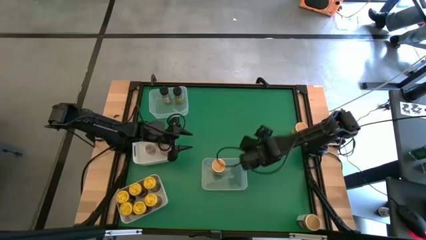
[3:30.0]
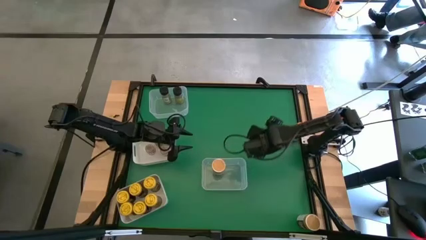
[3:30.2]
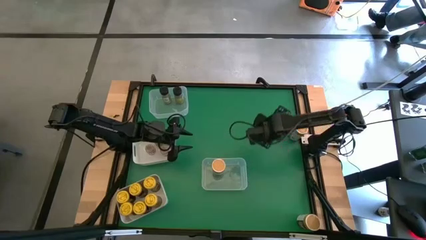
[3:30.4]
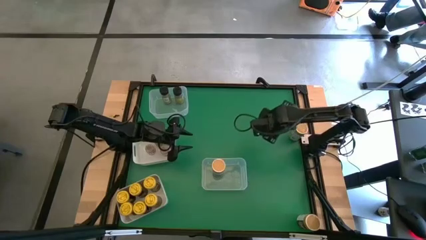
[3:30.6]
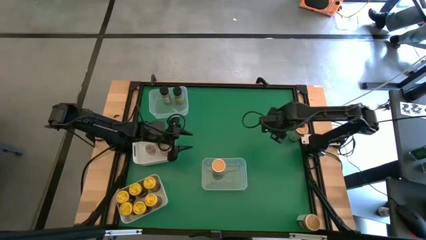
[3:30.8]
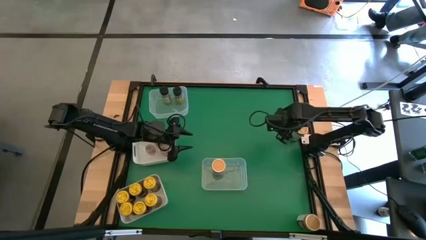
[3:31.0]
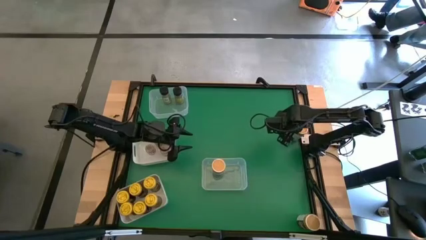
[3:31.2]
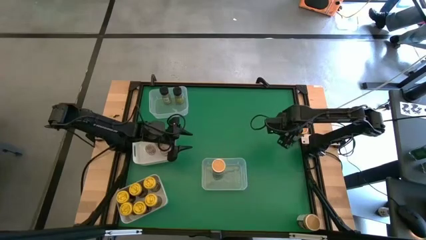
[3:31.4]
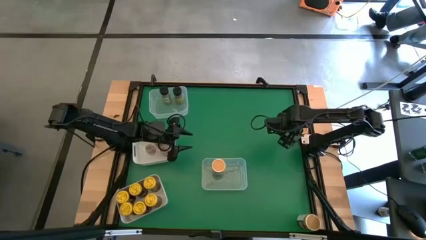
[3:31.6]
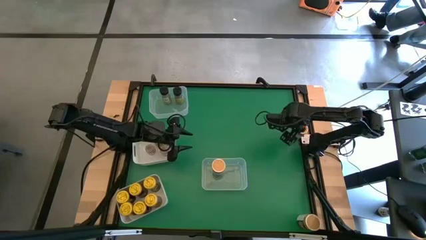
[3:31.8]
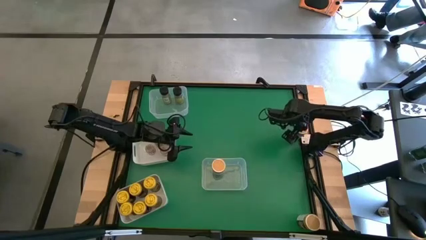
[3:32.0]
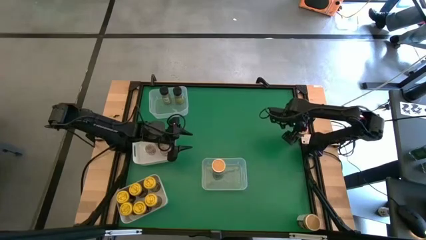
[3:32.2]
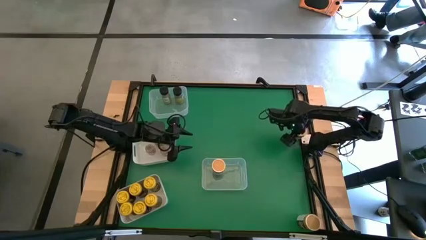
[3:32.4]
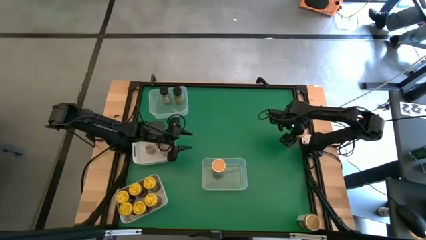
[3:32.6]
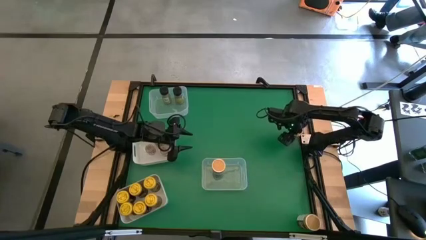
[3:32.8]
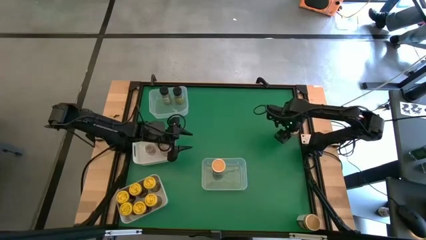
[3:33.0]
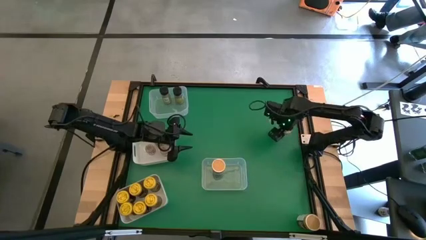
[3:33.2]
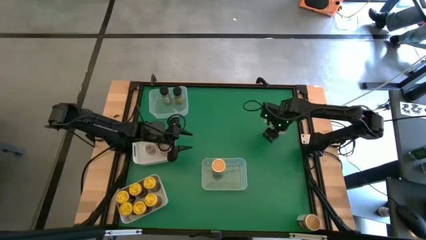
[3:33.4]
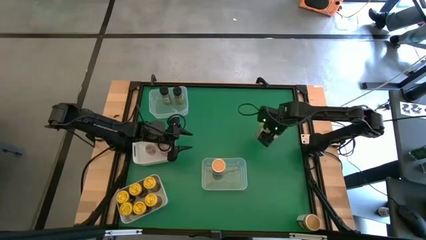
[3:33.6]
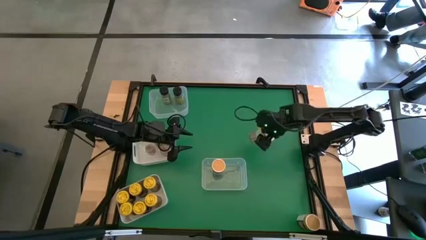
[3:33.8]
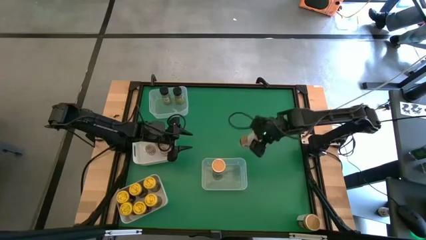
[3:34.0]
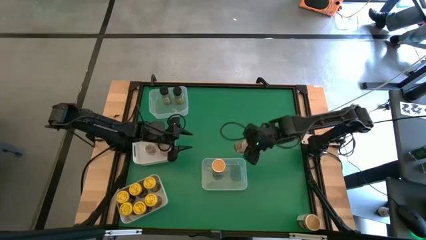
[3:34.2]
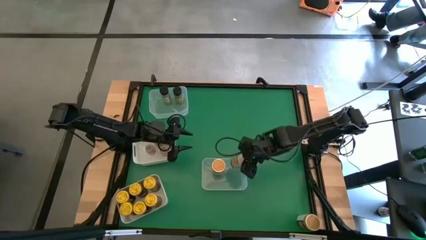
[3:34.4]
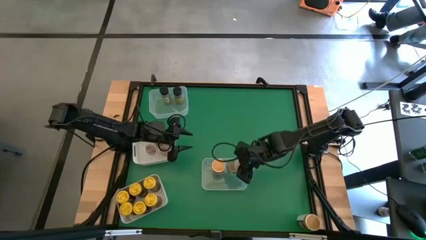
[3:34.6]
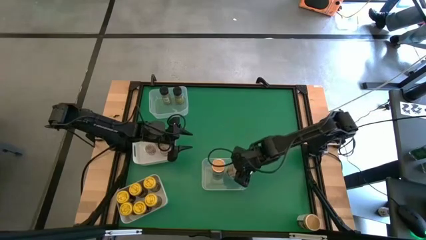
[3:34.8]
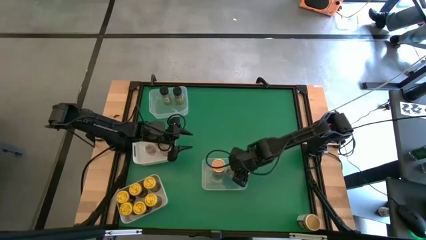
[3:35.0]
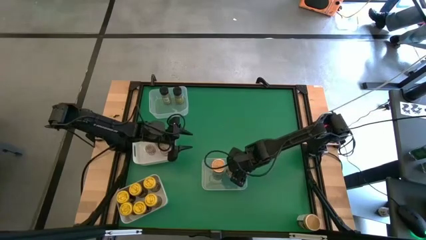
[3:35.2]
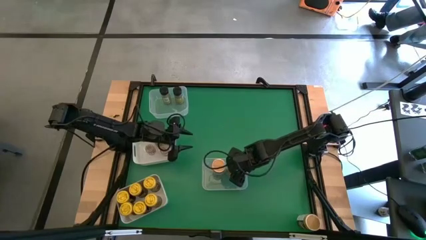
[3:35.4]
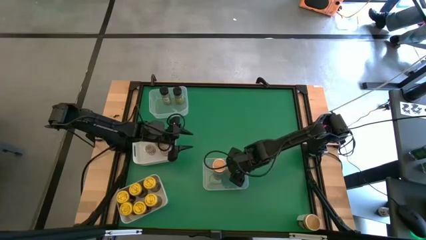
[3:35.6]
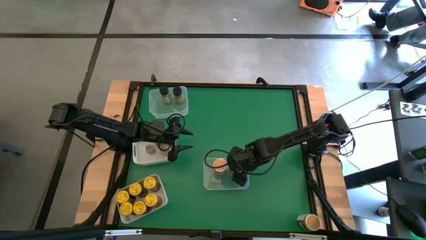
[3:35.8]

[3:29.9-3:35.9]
Task: Sort spices by type
Put the golden spice bottle into the bottom transparent bin

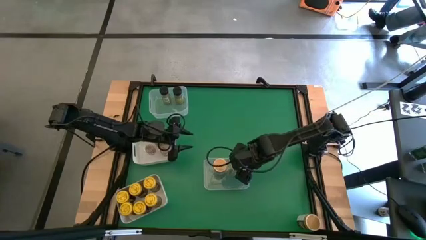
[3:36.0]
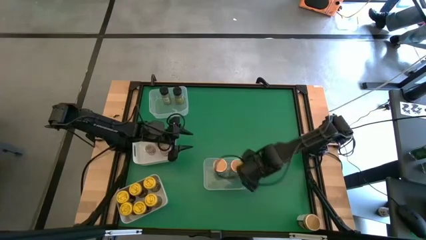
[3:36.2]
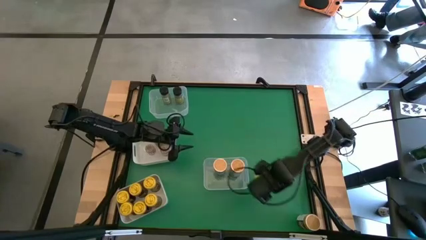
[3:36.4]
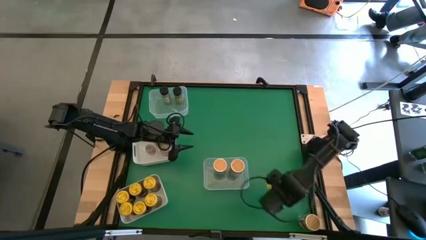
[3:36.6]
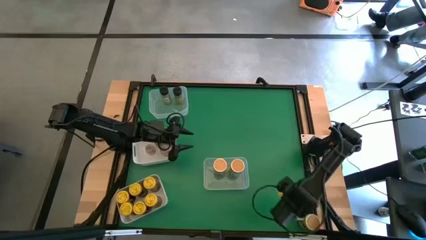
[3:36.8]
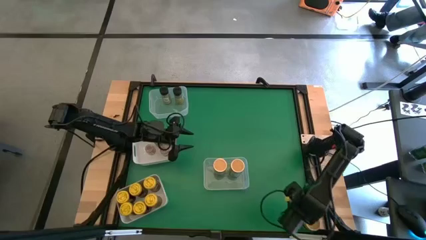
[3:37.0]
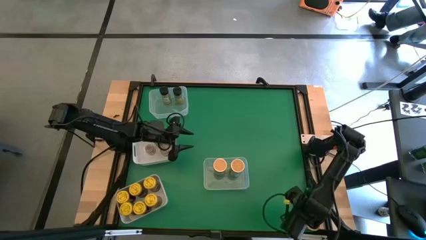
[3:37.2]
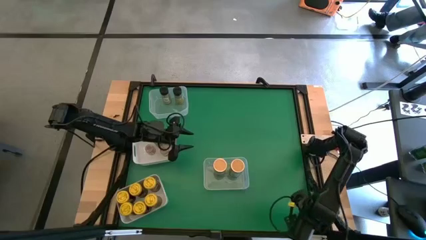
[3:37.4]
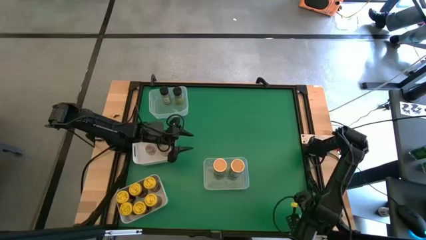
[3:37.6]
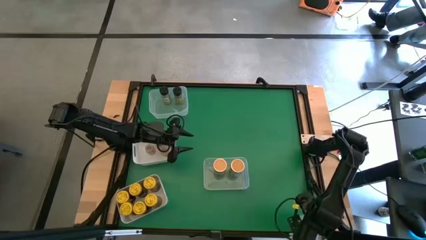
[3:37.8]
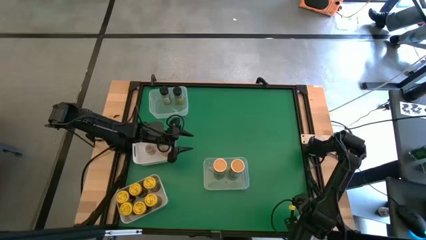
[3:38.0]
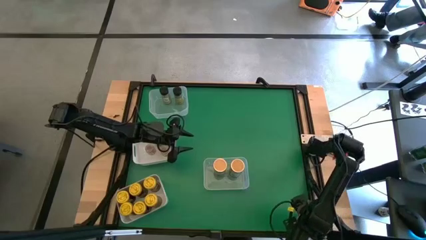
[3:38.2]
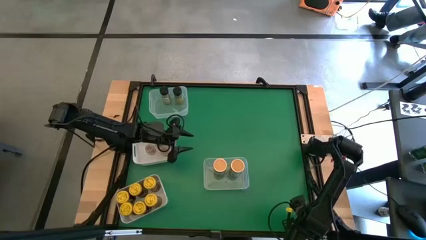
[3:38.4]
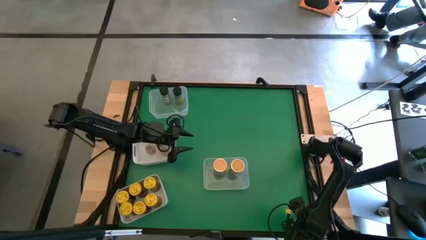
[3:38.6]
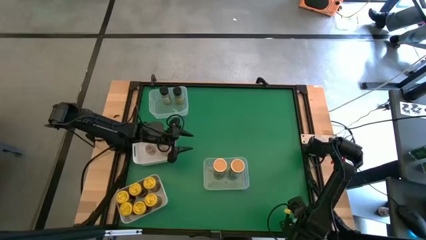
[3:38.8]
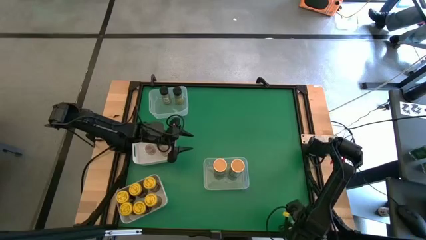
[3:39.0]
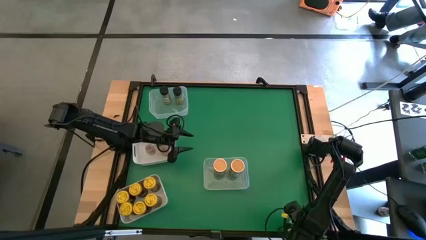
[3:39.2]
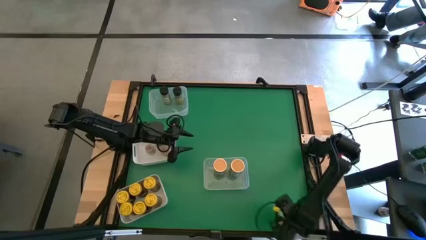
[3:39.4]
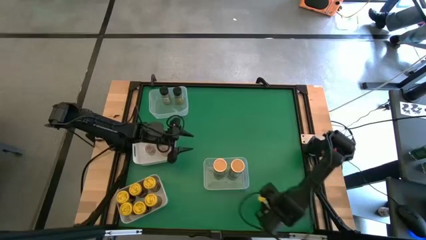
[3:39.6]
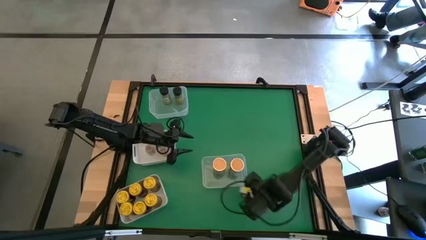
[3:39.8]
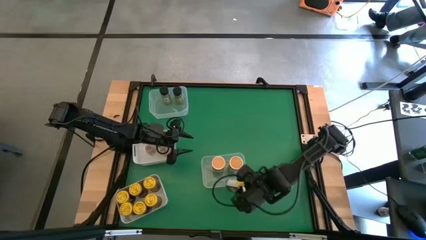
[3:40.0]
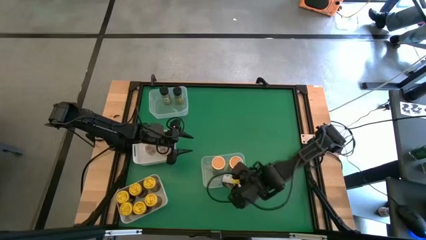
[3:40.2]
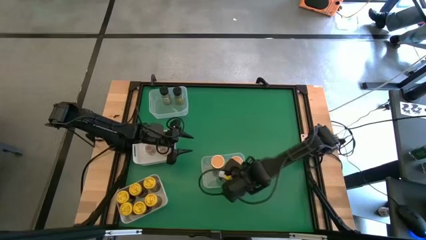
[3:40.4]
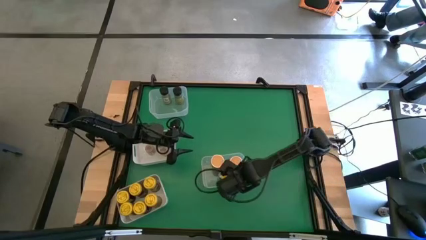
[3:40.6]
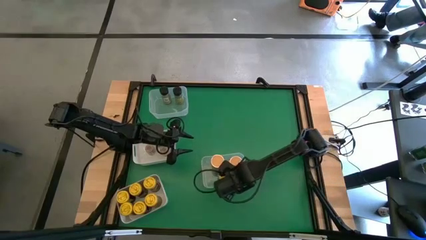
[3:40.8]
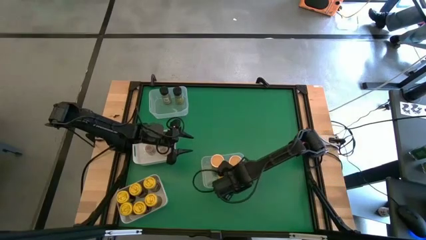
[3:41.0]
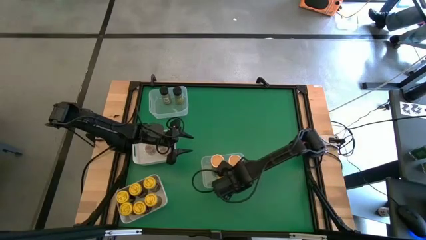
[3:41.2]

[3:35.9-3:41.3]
Put the golden spice bottle into the bottom transparent bin

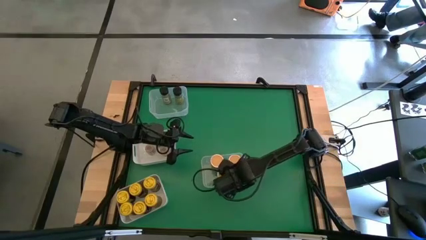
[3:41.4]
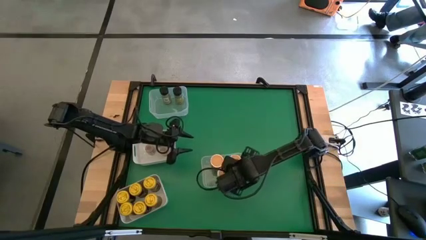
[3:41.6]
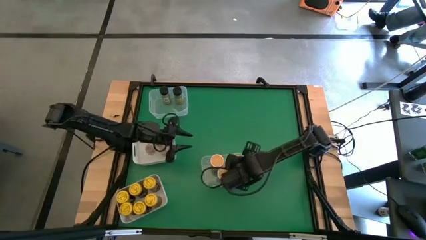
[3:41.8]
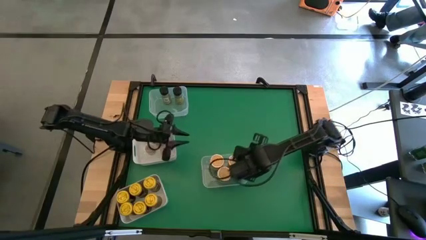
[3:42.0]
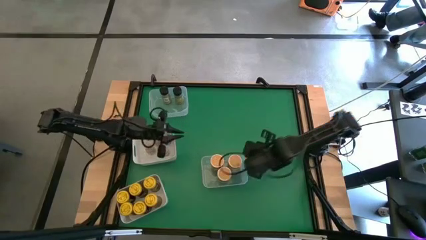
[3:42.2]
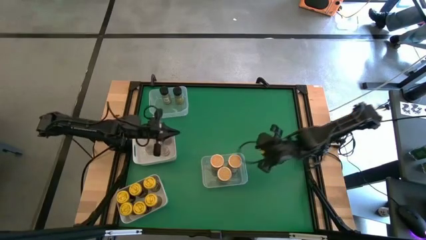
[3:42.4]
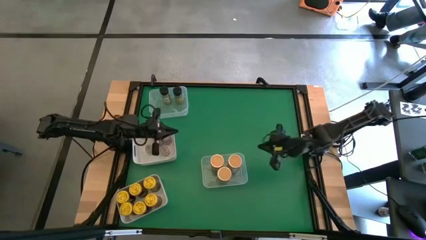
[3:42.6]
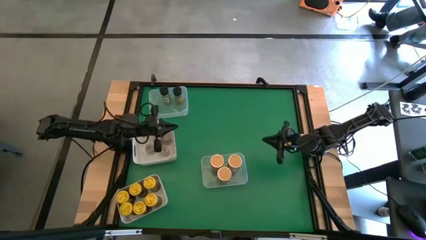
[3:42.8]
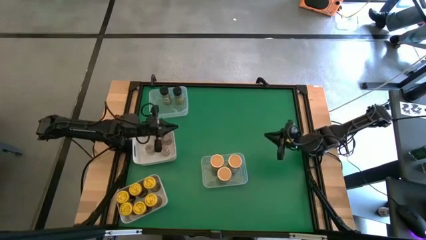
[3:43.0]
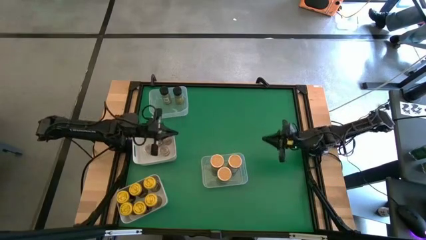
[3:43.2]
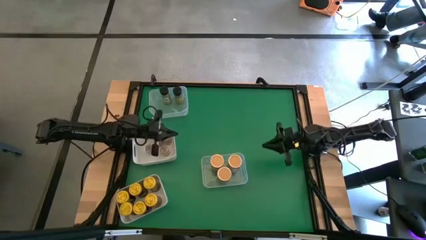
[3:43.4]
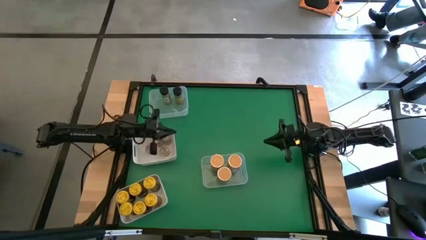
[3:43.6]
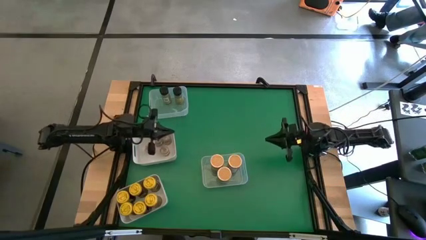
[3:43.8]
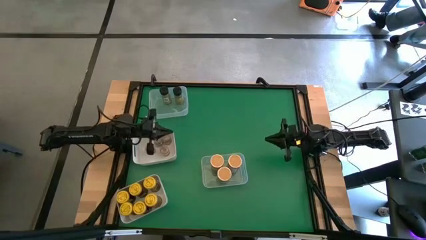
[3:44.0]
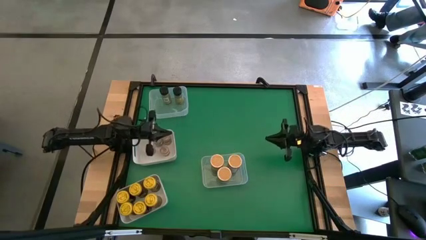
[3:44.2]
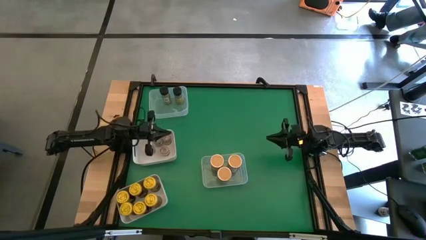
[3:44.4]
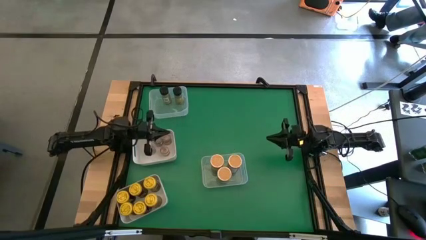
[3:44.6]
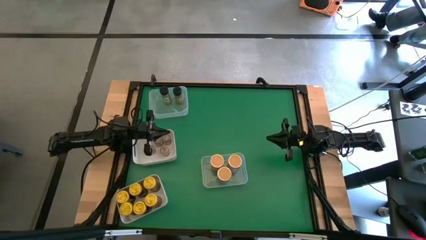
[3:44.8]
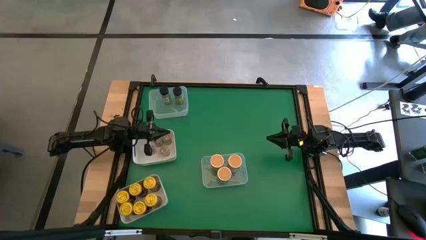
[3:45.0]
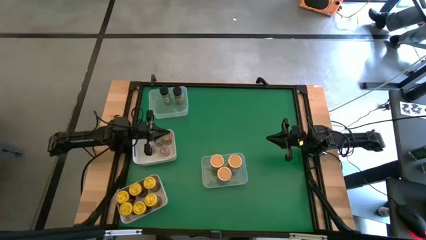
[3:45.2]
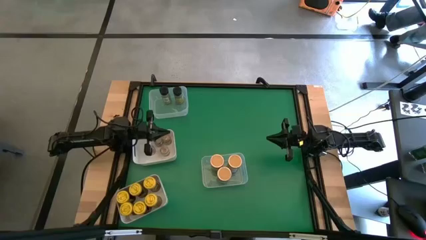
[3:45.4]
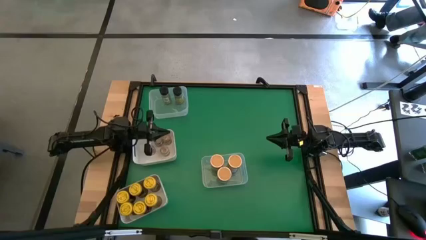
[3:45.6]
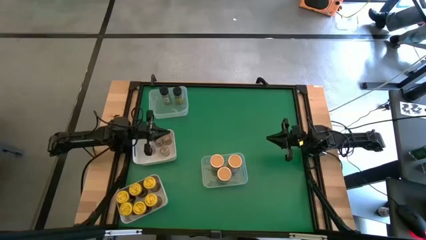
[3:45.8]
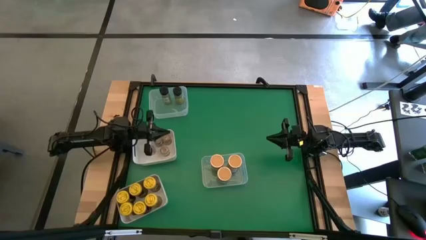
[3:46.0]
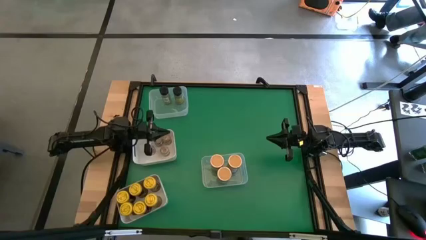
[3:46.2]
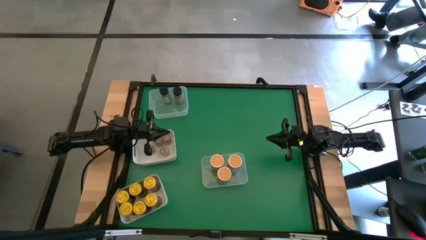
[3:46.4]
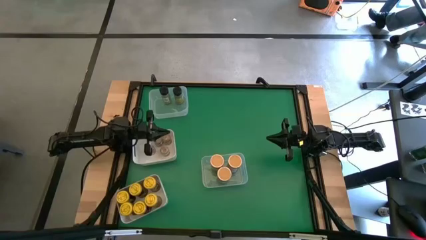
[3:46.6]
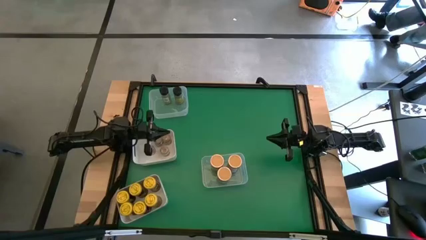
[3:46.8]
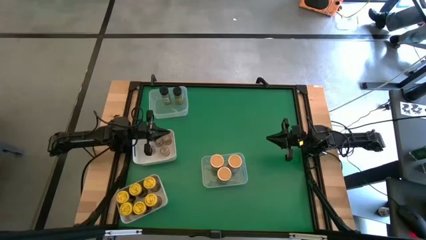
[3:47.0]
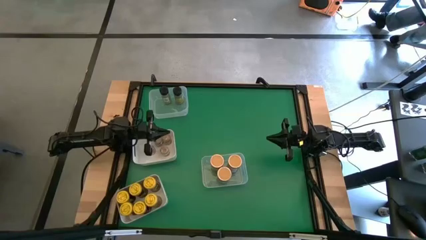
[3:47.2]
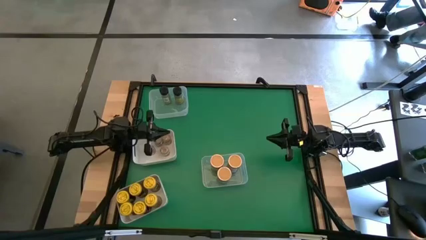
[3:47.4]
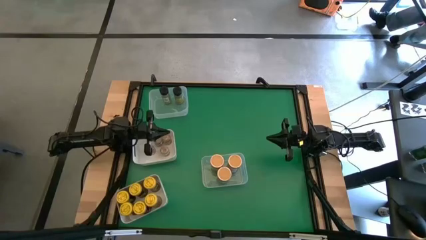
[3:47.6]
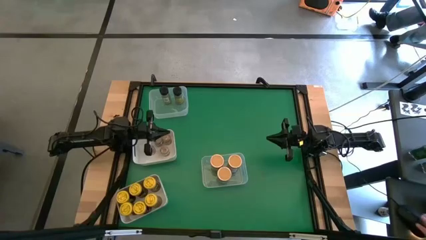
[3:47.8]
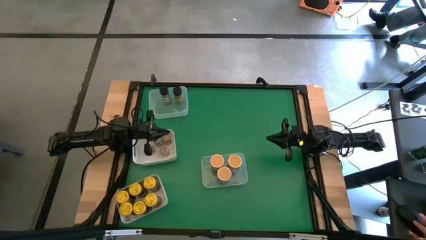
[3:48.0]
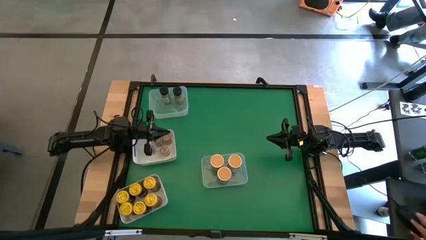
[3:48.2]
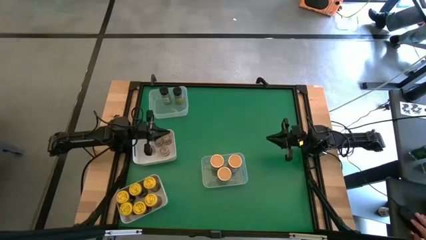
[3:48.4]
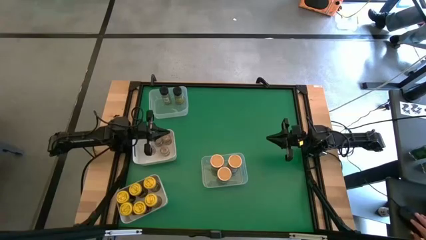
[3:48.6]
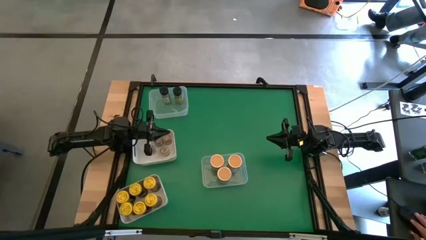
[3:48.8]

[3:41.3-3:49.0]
Return to Home Position
